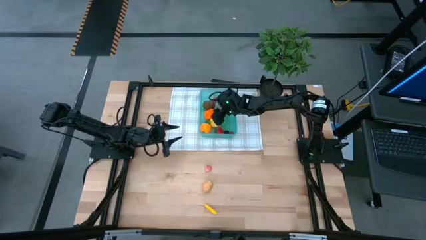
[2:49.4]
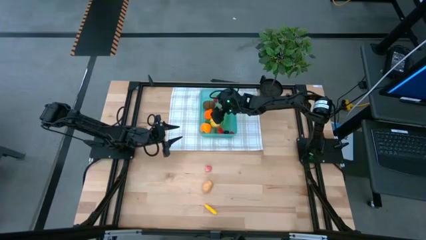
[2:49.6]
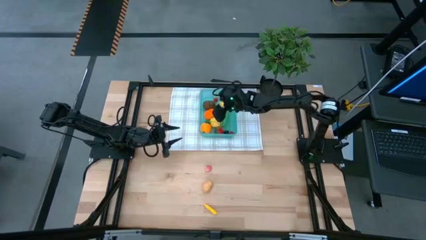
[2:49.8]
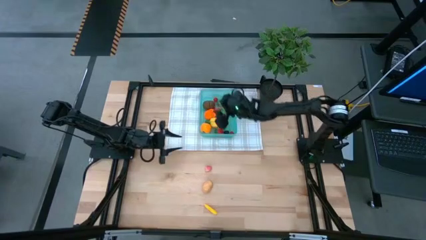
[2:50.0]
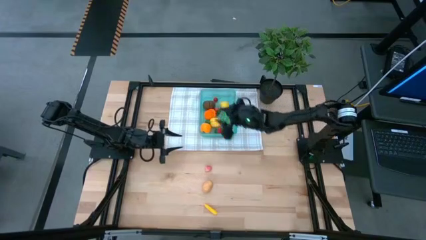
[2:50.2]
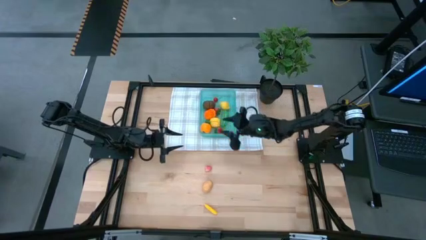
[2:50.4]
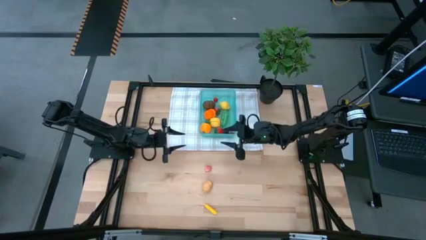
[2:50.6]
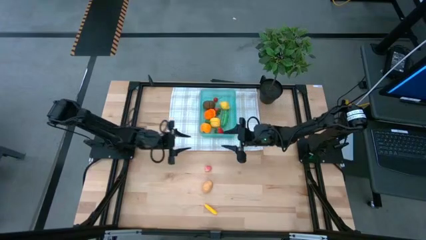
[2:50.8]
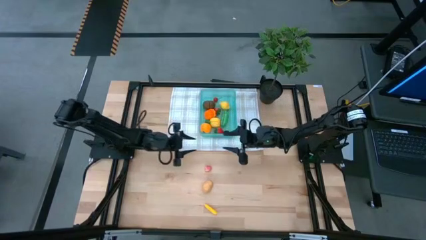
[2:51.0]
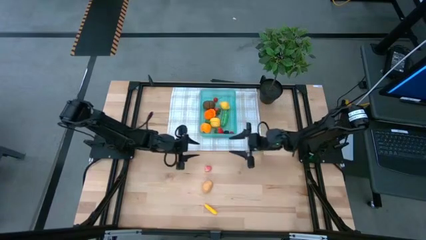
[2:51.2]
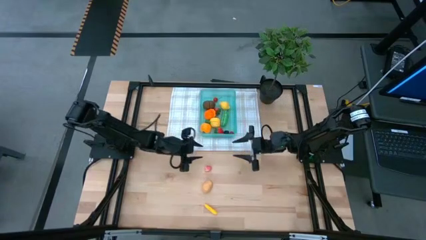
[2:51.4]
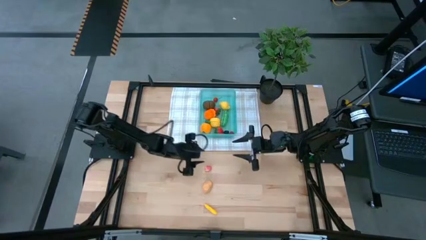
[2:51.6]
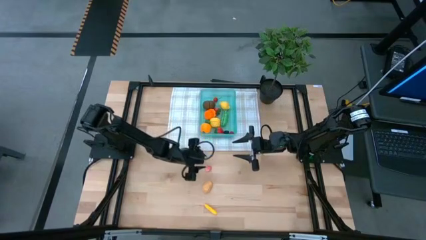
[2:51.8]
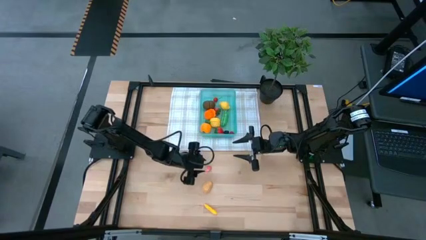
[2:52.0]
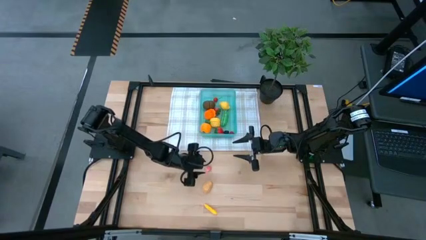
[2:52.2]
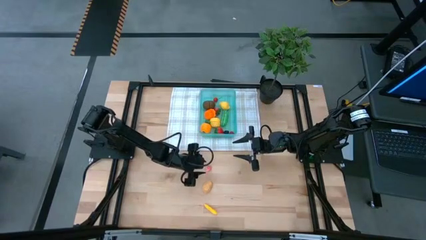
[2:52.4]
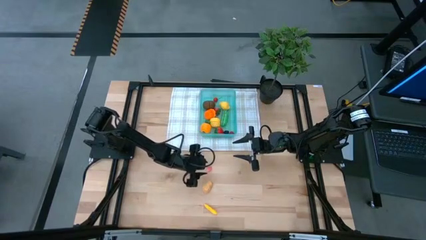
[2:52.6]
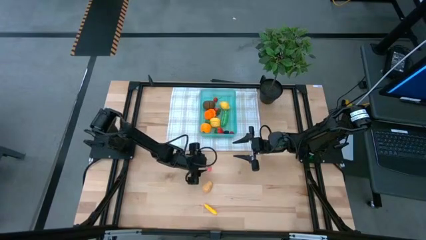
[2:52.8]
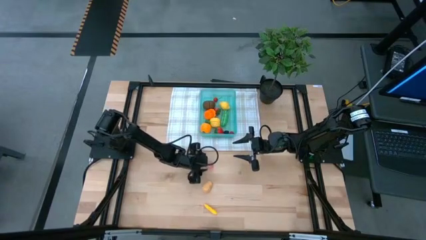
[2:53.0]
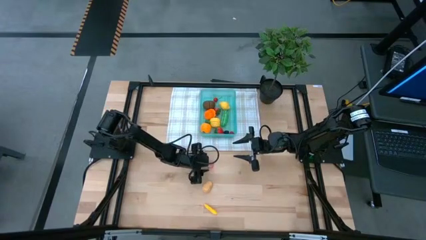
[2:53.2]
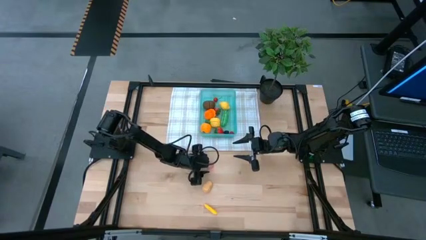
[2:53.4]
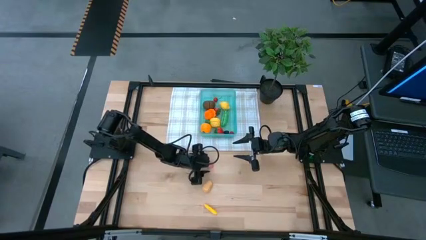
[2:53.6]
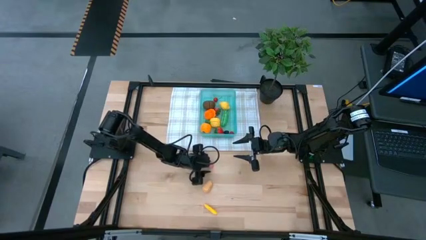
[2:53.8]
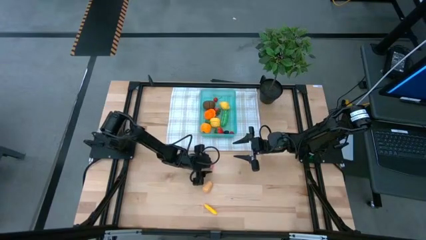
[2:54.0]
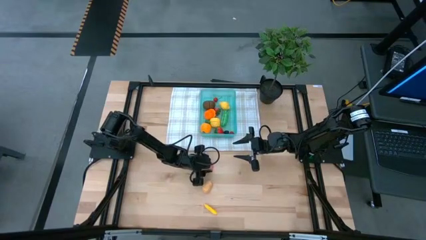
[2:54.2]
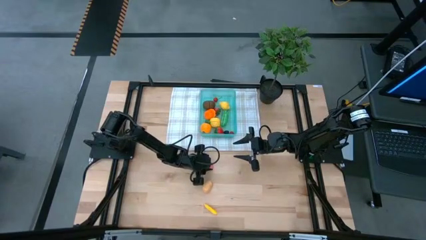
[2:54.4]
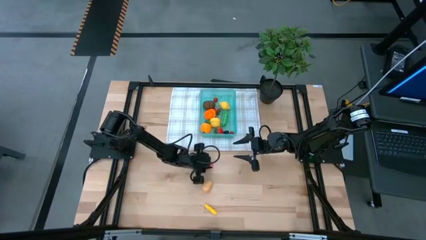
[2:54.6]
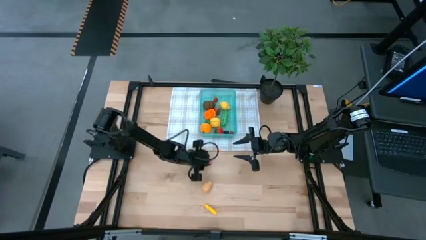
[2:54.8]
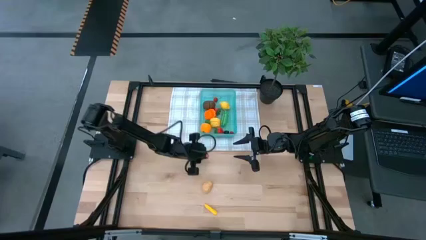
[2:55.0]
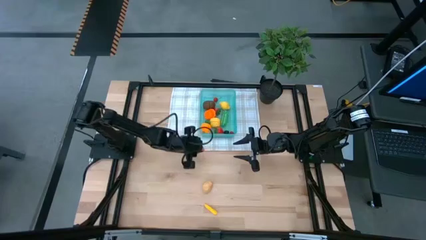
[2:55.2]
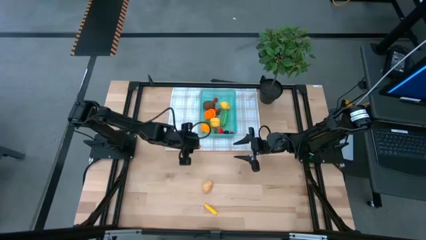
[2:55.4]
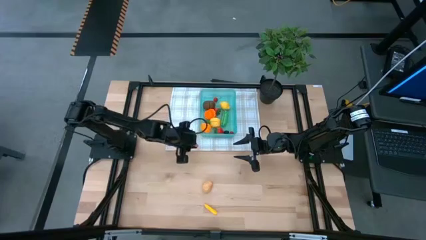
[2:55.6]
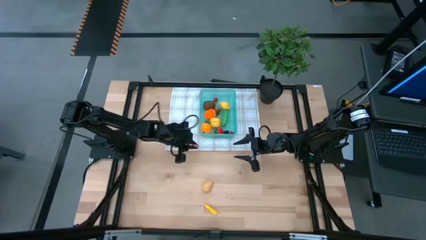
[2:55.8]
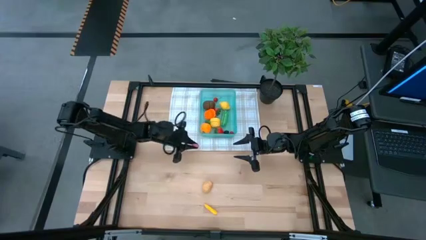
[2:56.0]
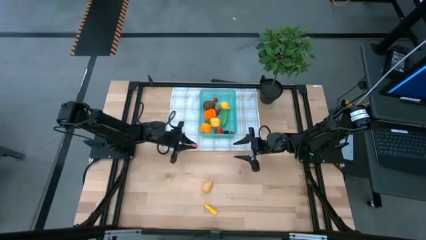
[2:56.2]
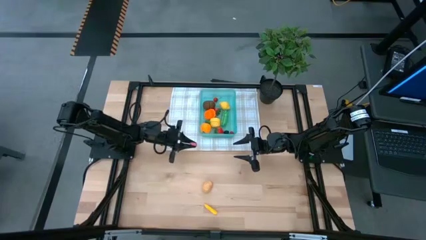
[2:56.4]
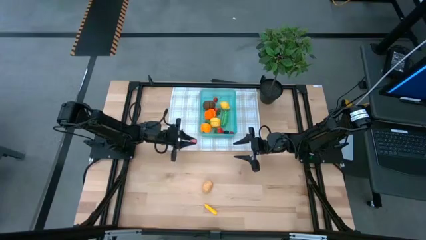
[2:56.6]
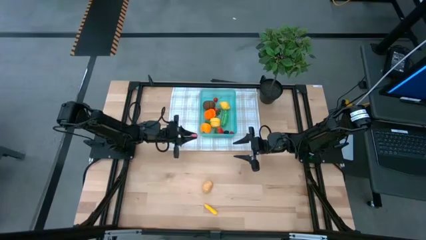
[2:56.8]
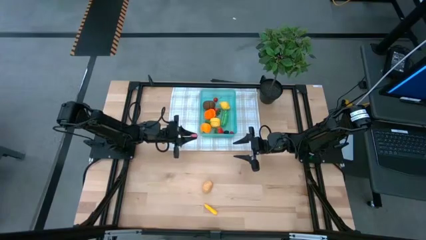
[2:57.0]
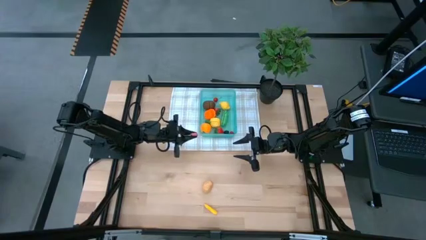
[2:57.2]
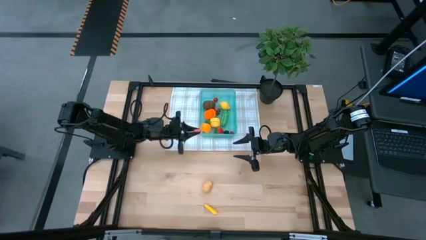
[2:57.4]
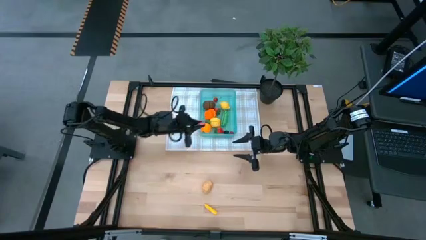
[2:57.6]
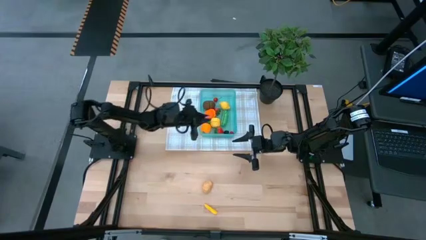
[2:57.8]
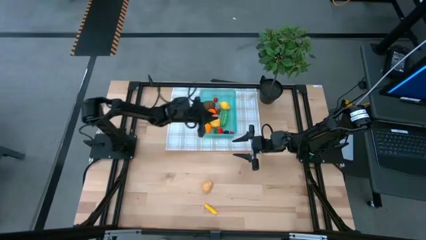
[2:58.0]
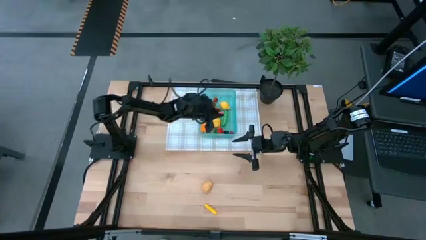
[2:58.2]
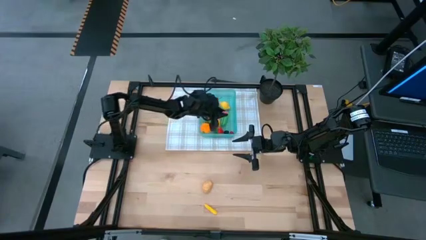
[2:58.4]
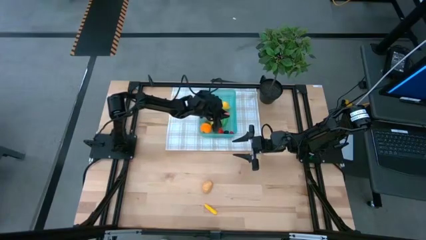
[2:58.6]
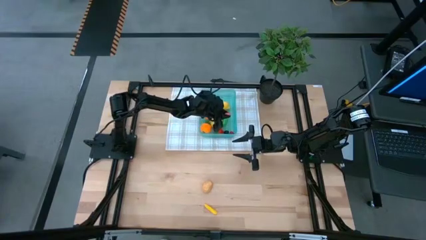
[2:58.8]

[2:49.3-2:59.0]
Task: Pick and placing Produce into tupperware
Put the pink peach into the green bin

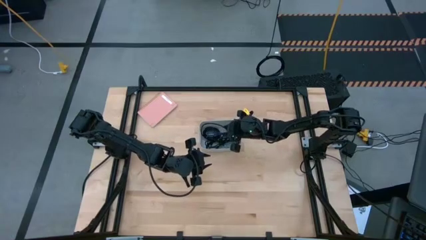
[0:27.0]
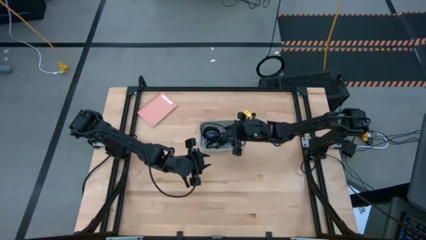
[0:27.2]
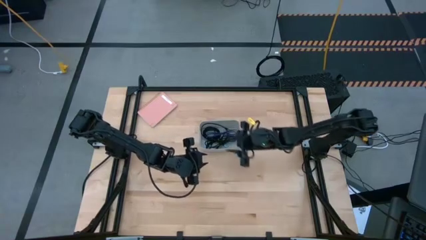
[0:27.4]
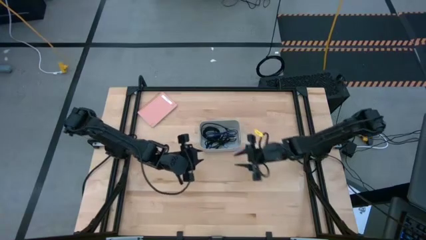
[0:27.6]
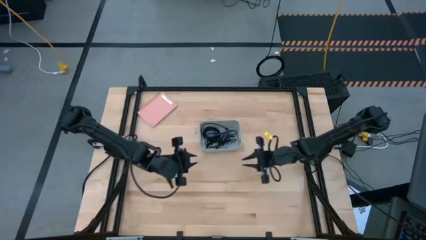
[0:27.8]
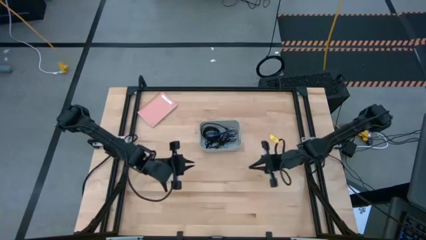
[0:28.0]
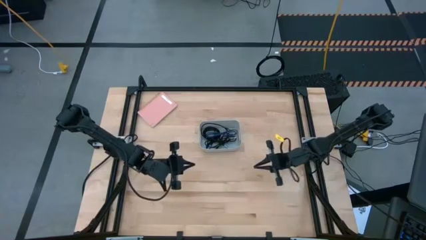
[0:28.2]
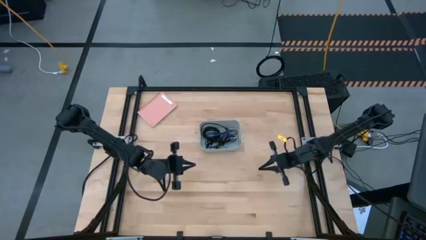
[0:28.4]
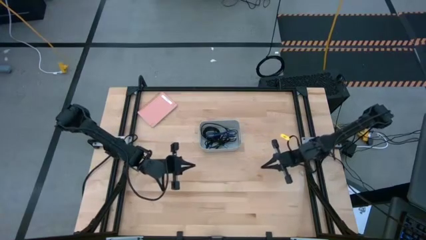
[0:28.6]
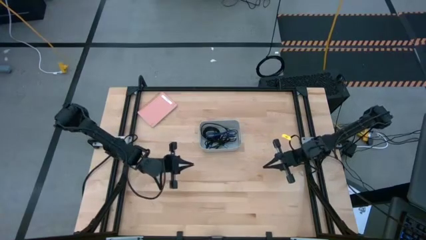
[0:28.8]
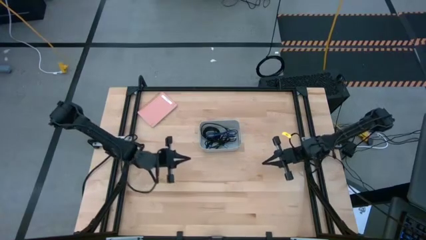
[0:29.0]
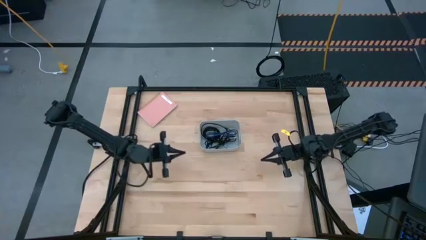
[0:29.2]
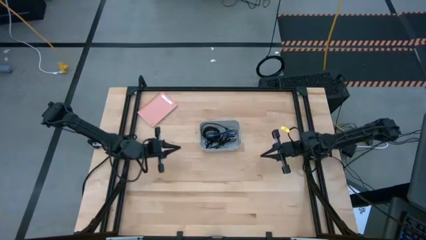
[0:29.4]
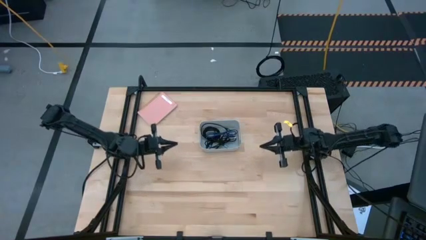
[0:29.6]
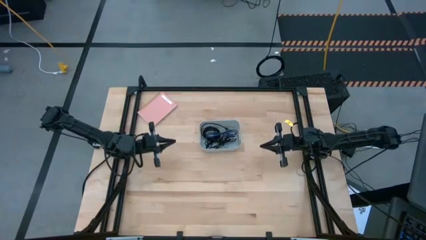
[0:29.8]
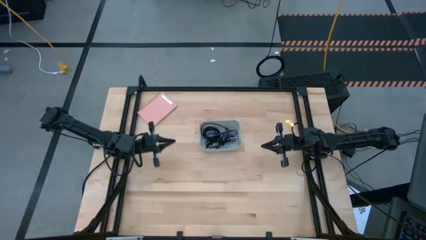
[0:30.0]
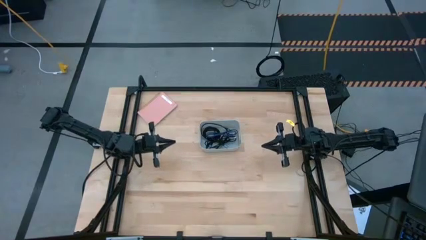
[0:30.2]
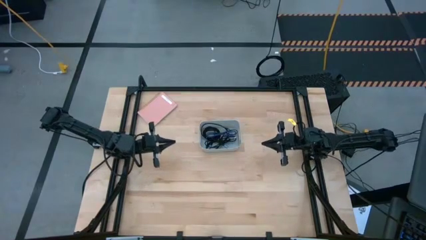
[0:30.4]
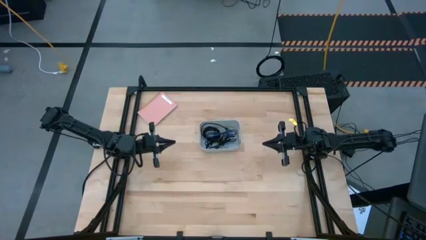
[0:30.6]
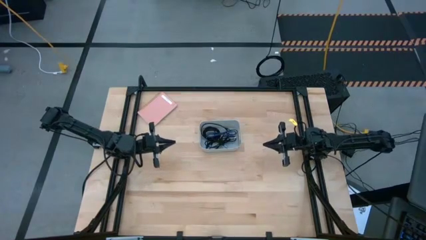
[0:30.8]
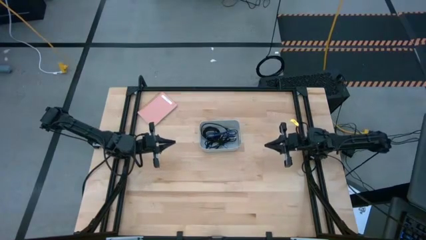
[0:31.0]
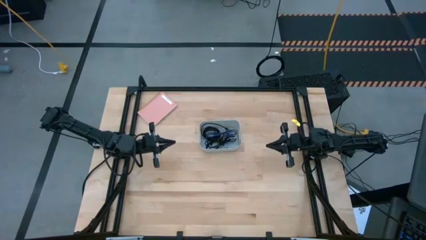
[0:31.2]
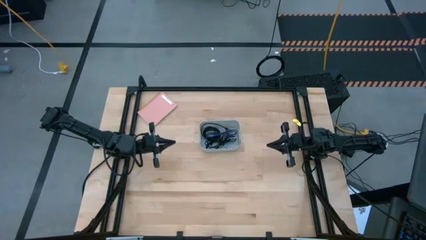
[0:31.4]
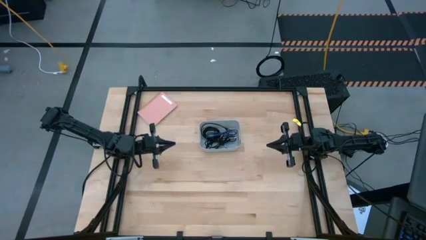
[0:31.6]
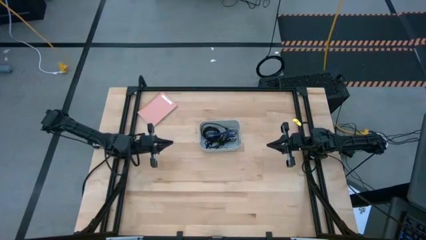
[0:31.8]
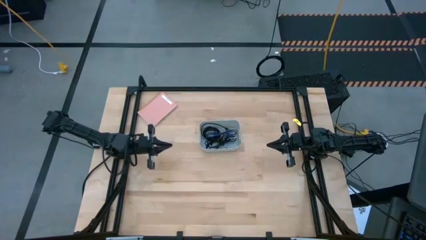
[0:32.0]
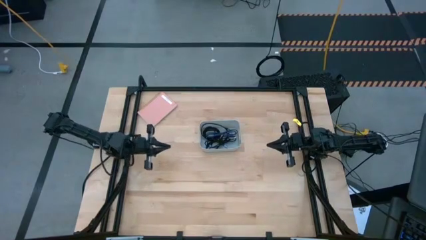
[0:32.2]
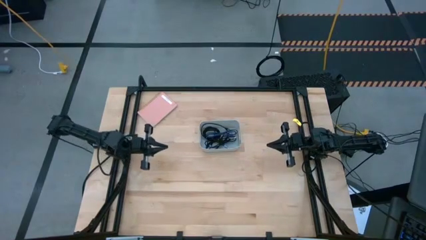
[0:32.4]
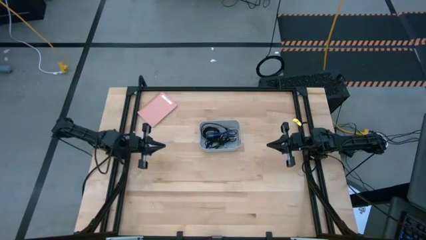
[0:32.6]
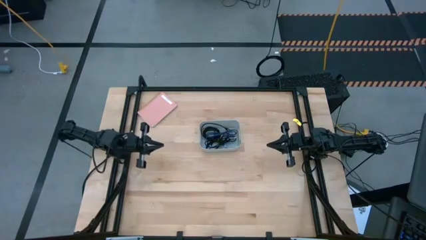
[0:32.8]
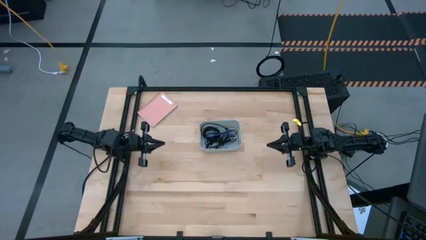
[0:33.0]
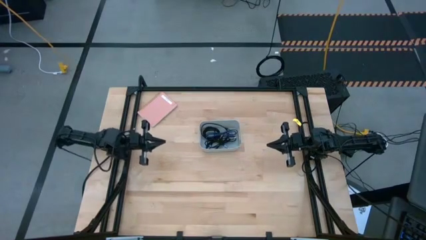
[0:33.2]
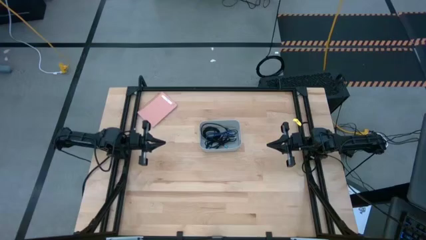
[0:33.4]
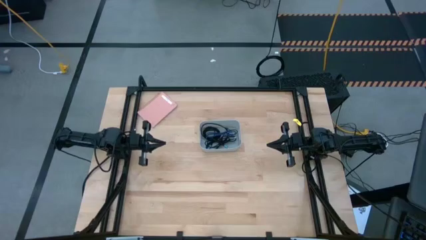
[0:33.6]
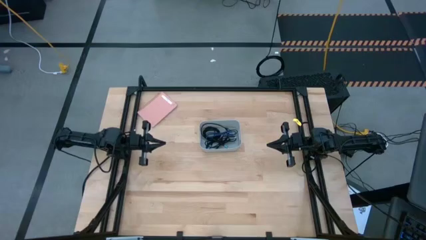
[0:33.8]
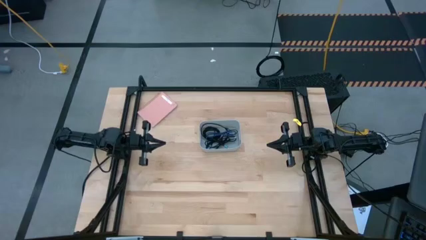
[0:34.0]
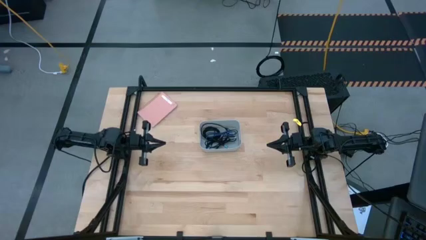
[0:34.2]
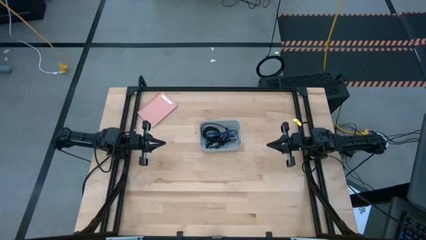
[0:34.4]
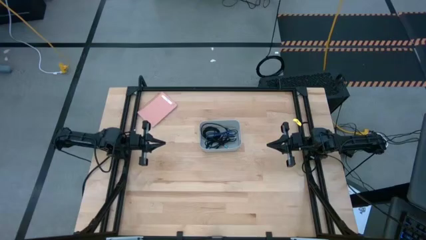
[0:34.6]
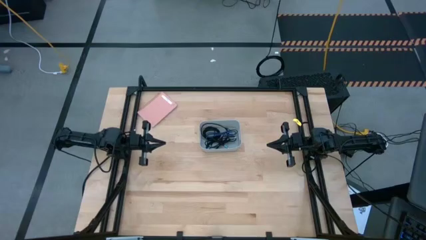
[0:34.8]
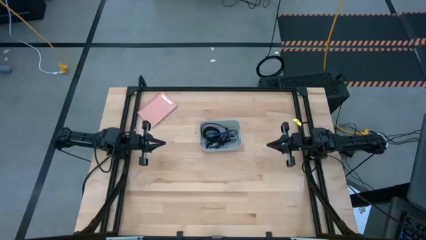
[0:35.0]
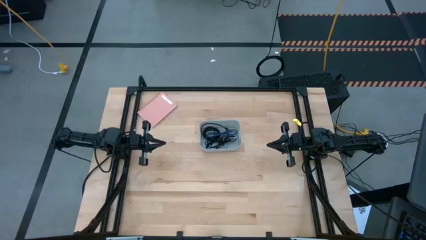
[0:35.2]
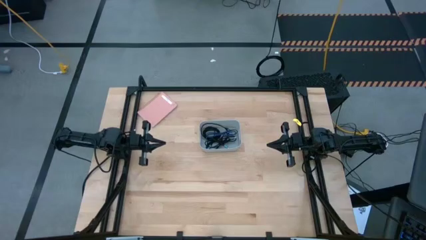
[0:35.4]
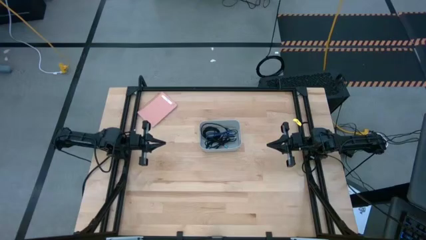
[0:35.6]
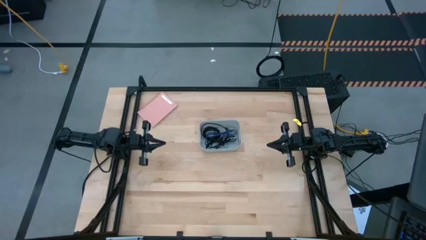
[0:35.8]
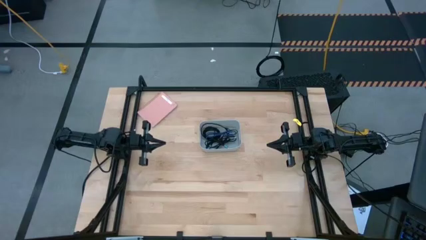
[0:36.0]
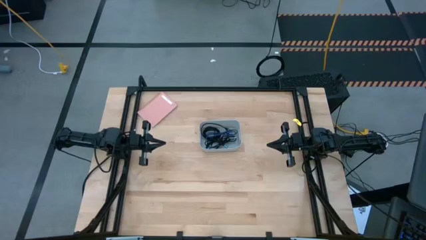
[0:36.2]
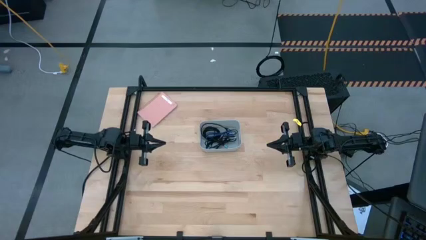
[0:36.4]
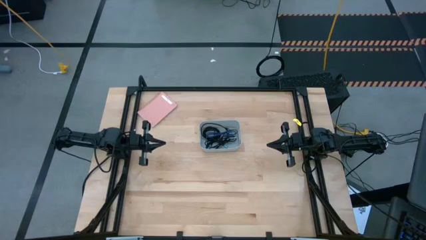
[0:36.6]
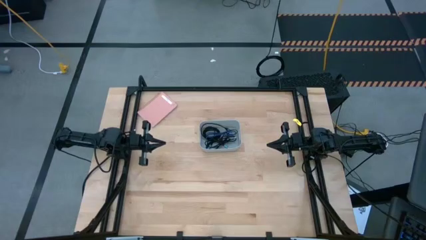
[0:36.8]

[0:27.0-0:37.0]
Task: Pick and place USB-C Cables
Return to Home Position
